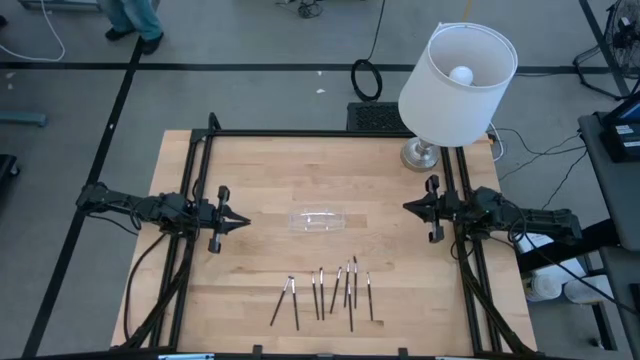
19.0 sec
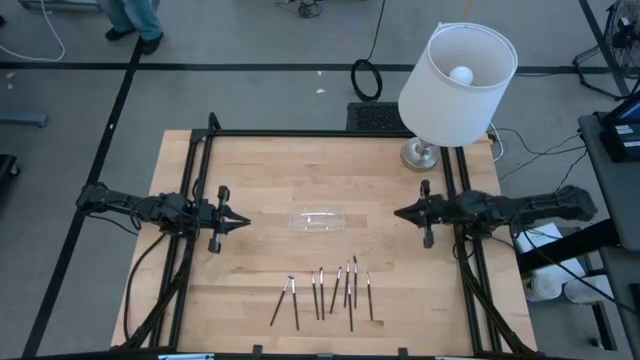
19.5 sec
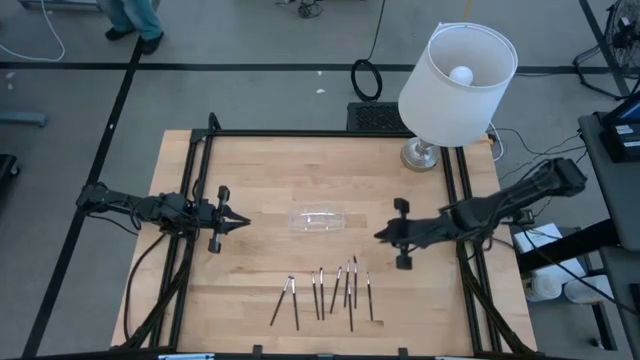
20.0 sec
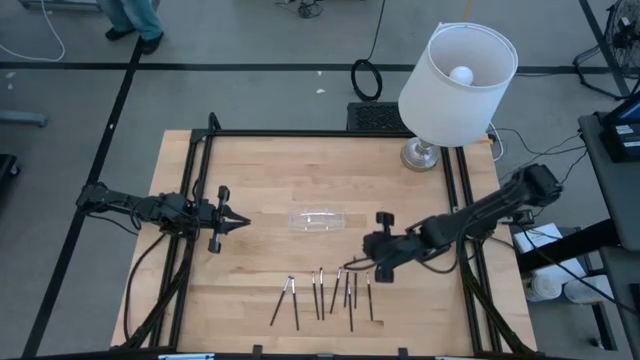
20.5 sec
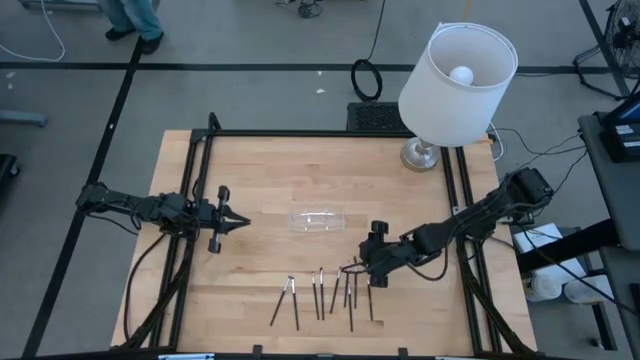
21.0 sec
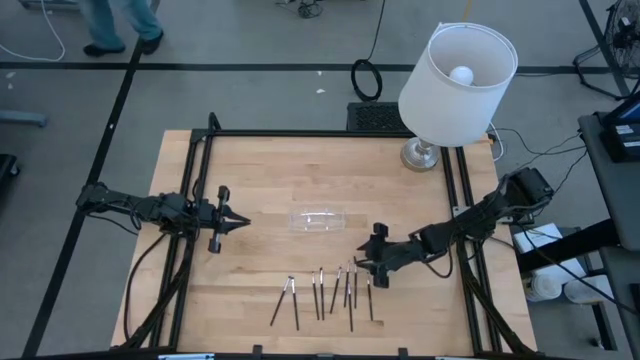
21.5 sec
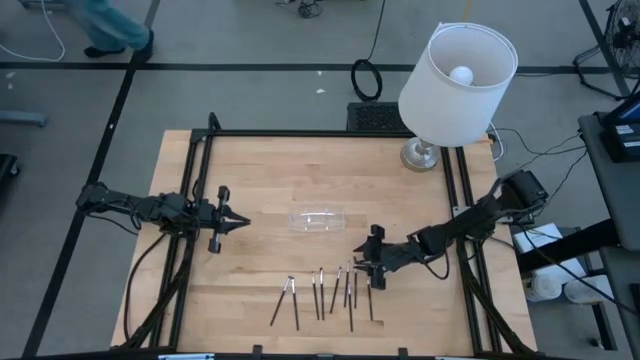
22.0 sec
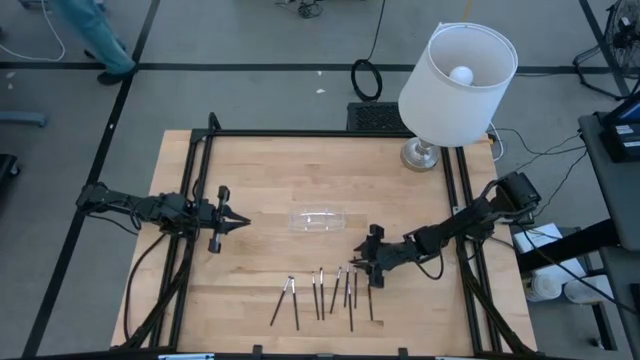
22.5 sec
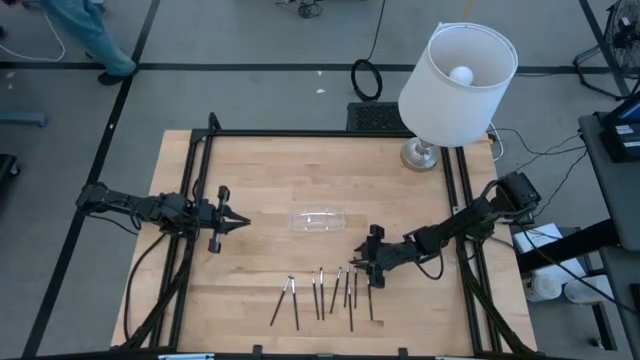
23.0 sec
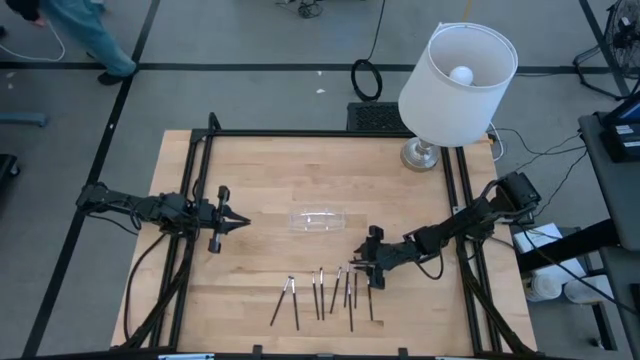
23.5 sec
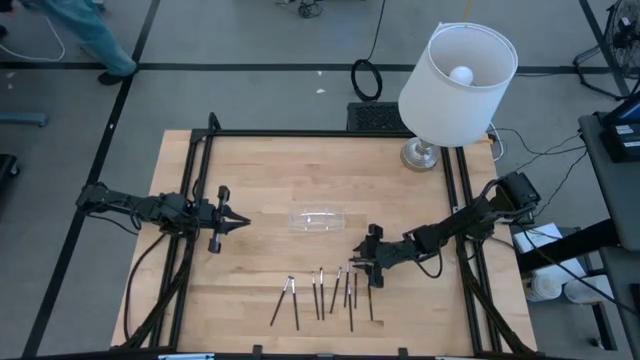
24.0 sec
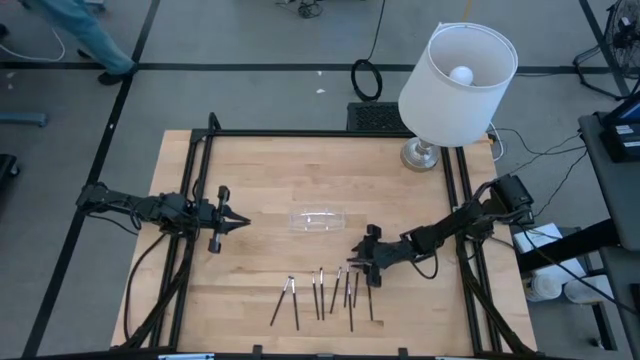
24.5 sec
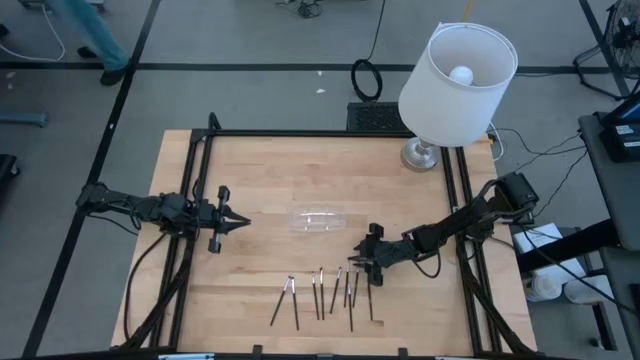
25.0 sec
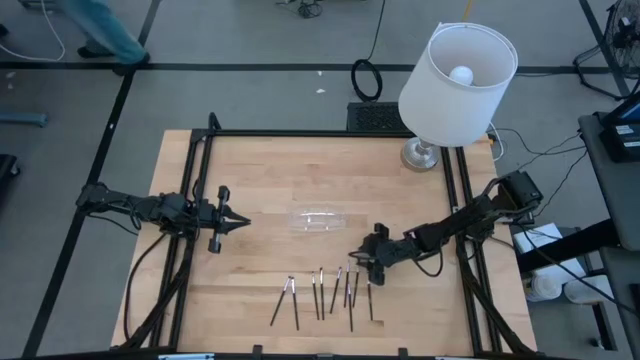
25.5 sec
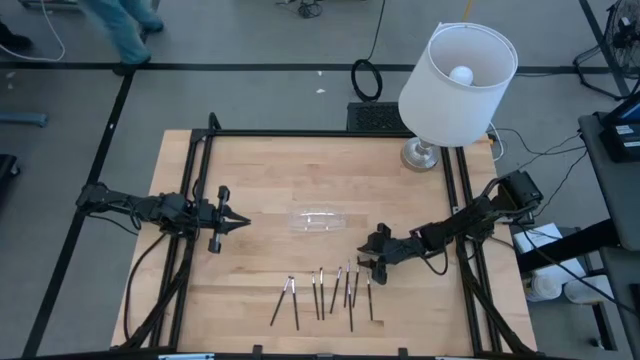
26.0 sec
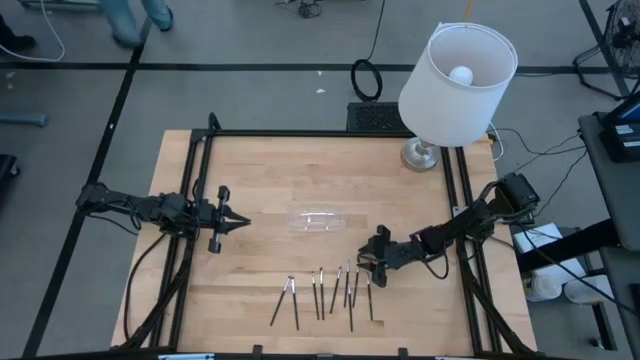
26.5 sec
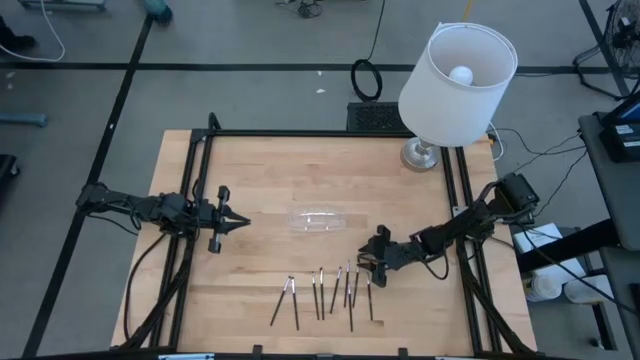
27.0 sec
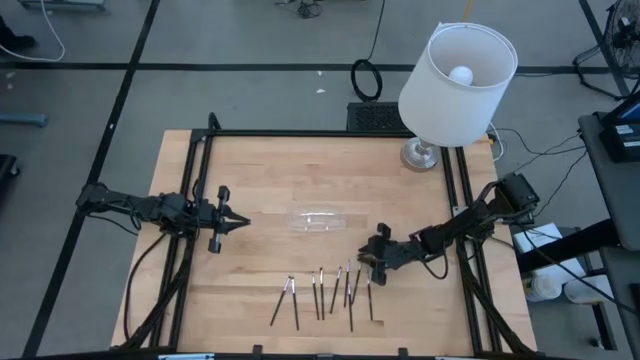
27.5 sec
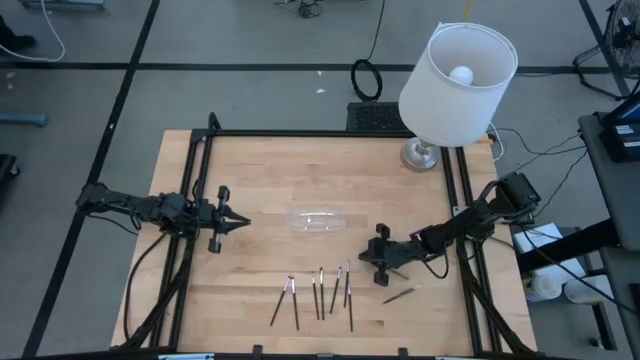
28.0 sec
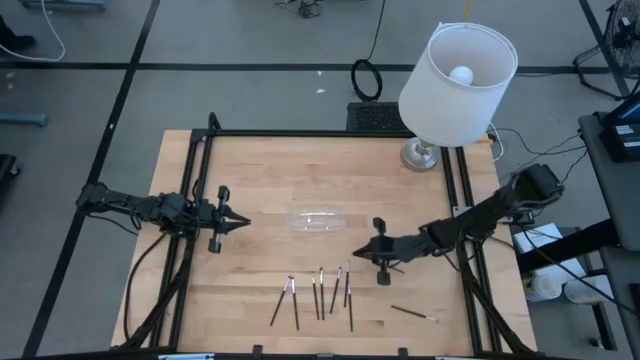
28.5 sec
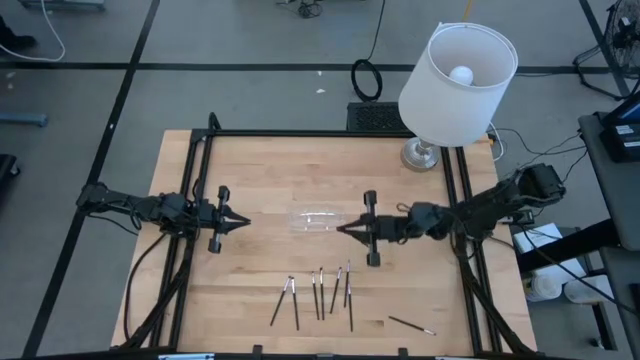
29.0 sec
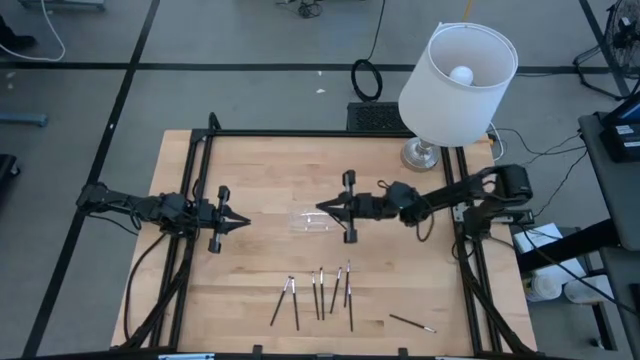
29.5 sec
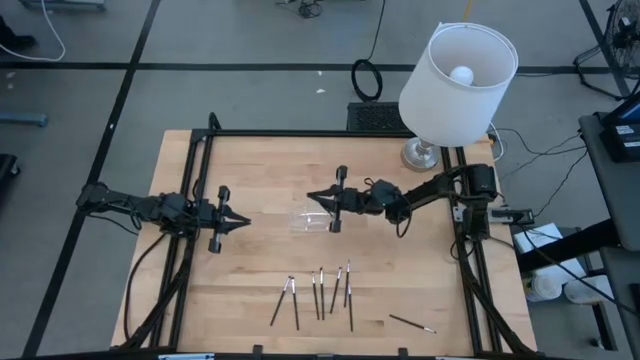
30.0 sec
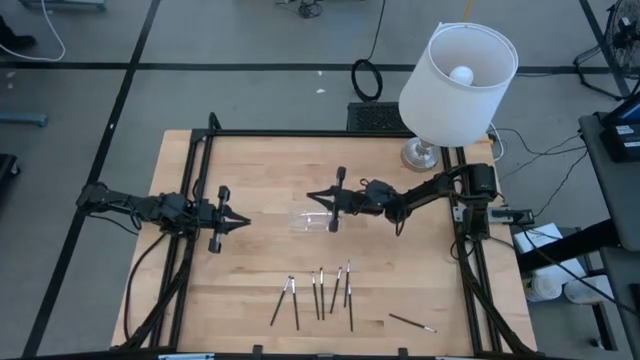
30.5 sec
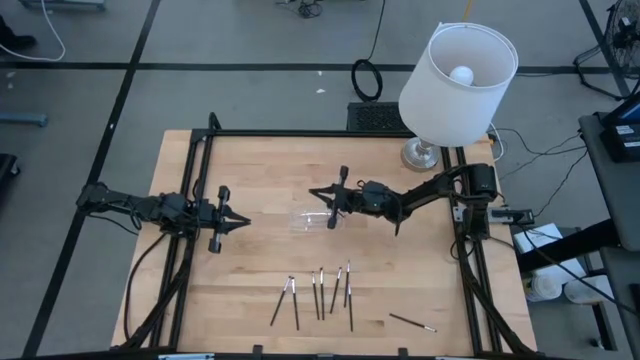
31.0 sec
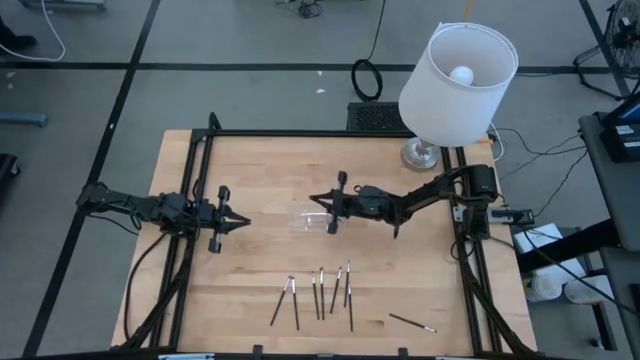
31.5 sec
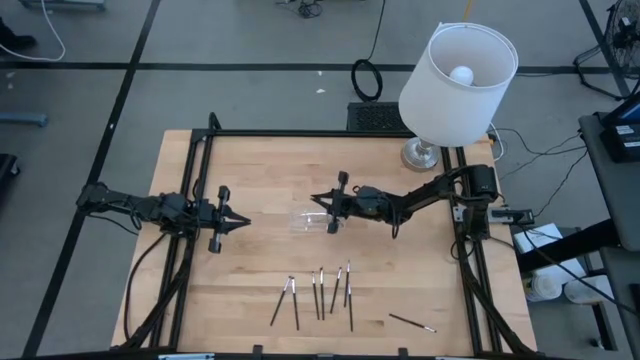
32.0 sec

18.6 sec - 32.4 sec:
Task: Pick & Place Makeup Supplies
Put the makeup brush into the transparent organizer

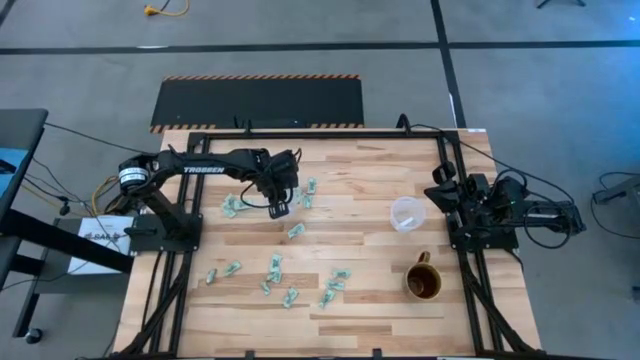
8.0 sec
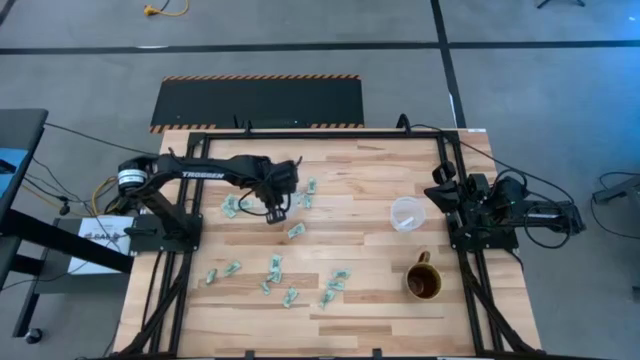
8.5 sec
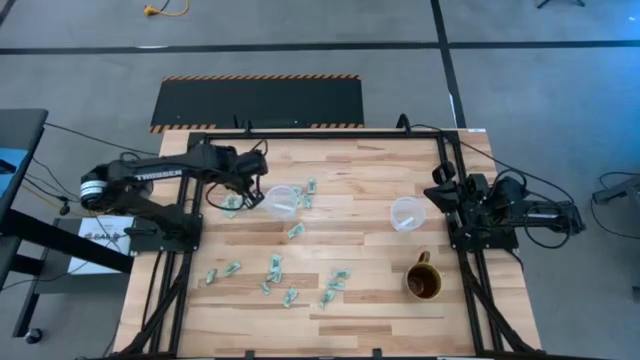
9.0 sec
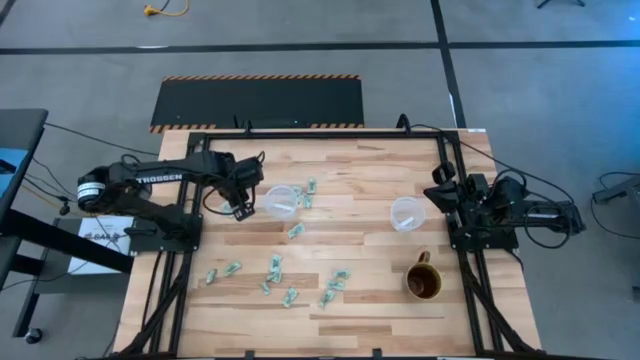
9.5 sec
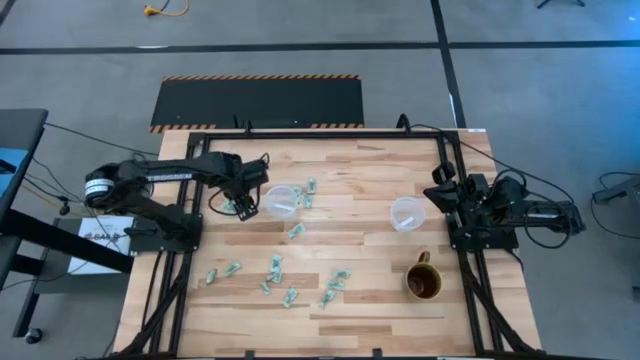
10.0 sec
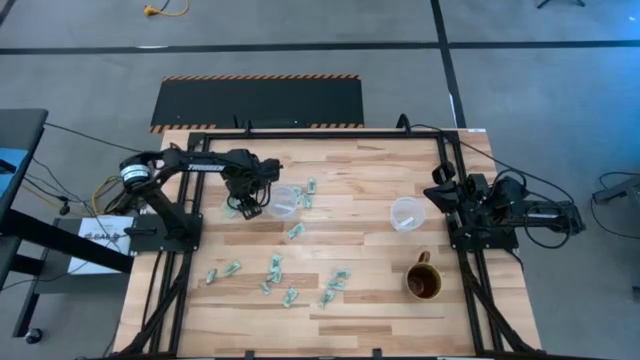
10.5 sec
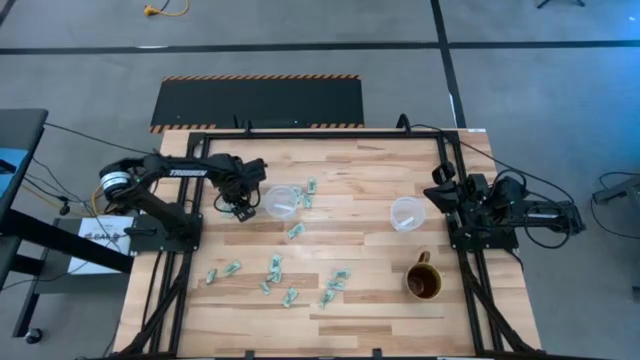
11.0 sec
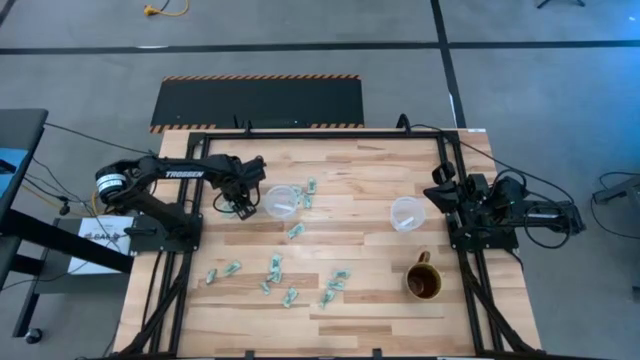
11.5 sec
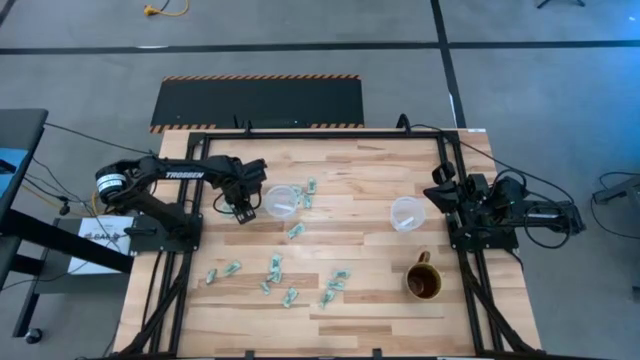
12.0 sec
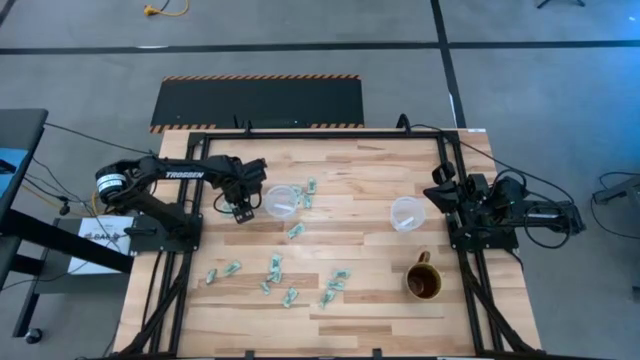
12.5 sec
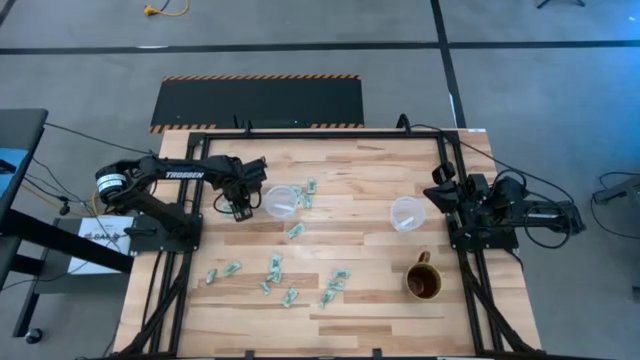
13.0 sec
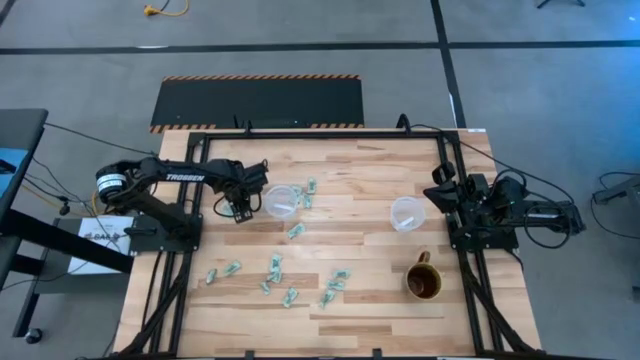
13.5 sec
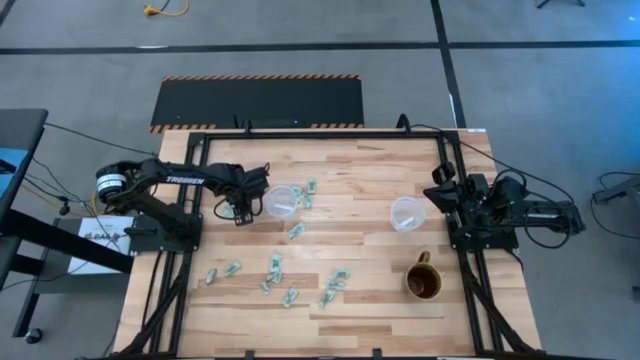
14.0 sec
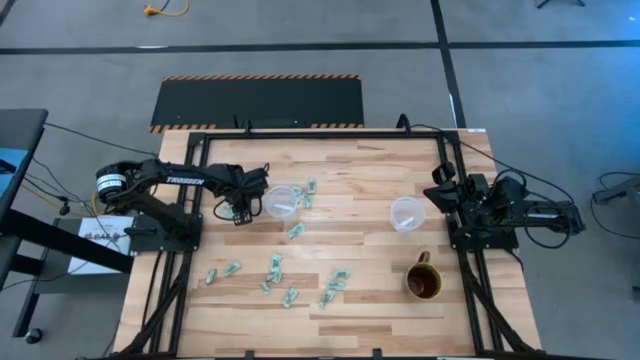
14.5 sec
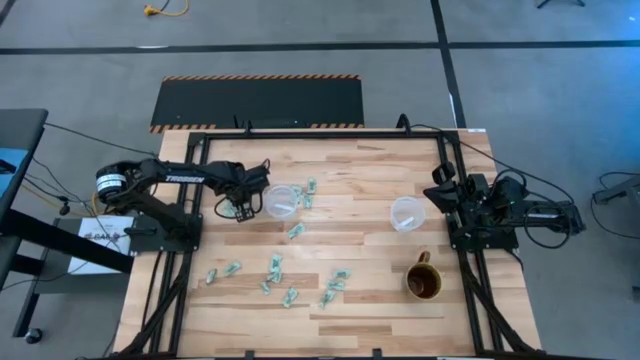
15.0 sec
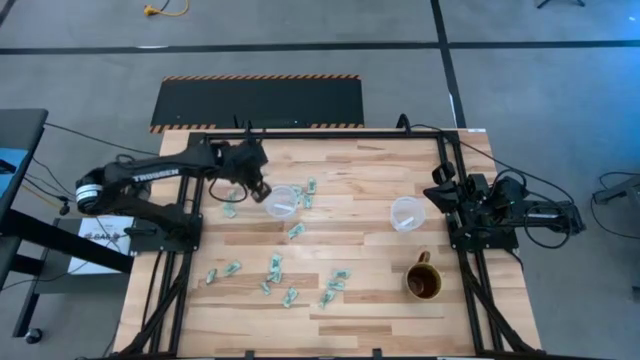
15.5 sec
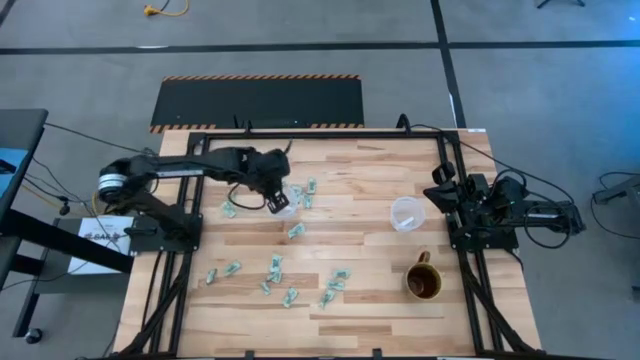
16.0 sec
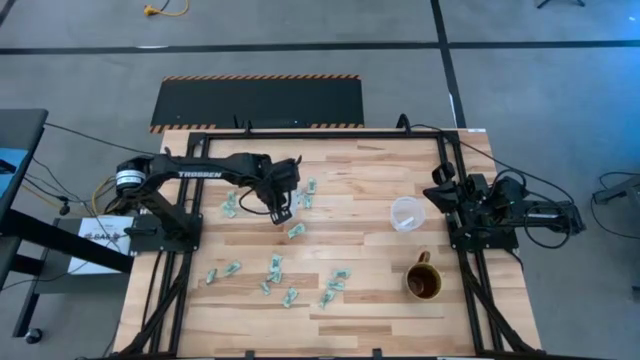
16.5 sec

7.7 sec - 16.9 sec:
Task: Pick and place Stevia / Truvia into bins
Put the white stevia packet into the left transparent container
